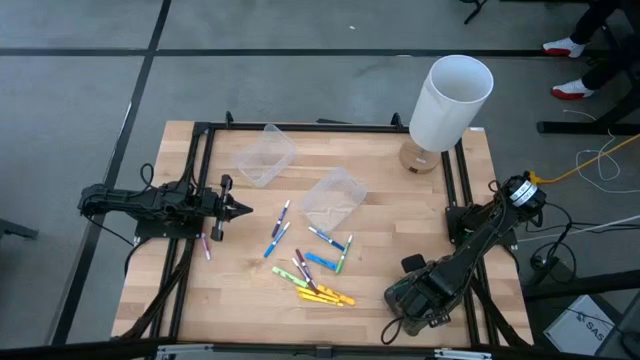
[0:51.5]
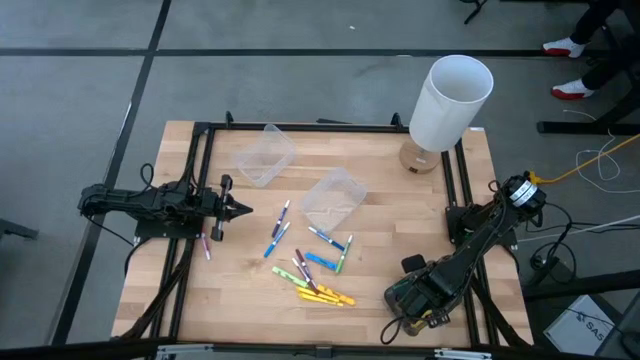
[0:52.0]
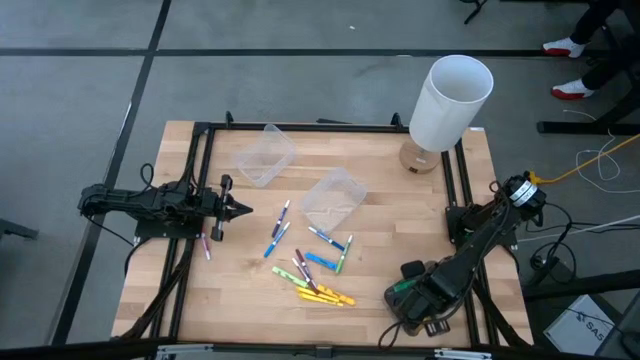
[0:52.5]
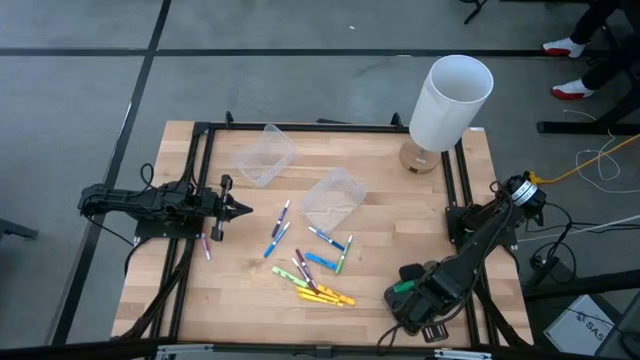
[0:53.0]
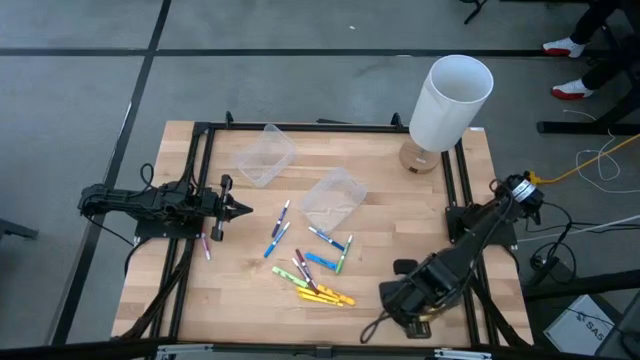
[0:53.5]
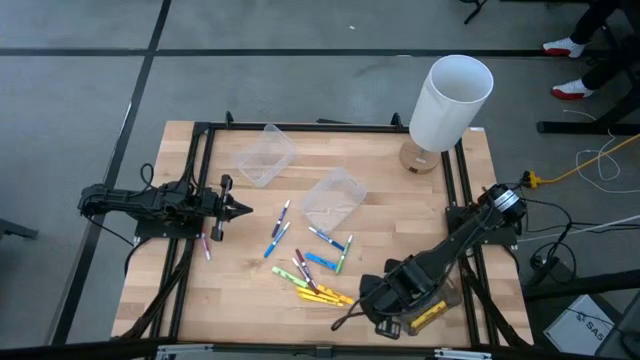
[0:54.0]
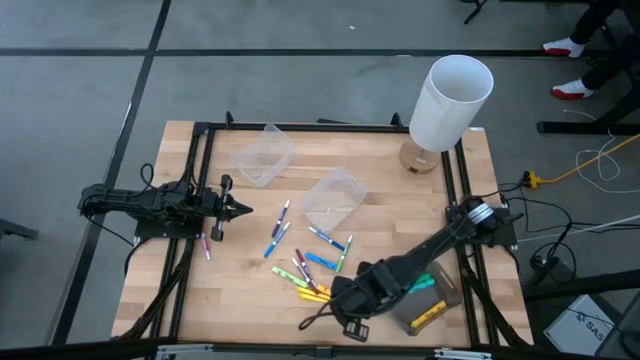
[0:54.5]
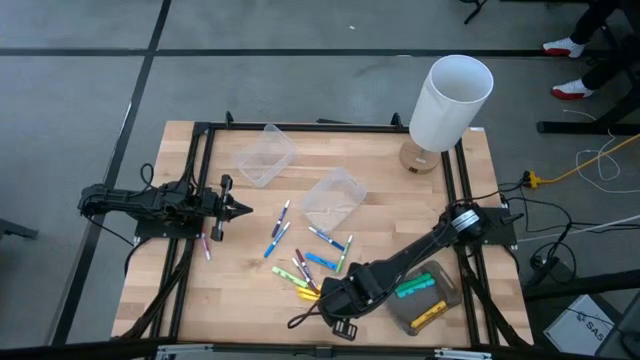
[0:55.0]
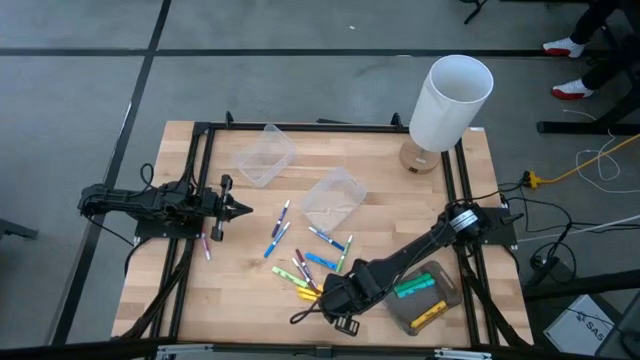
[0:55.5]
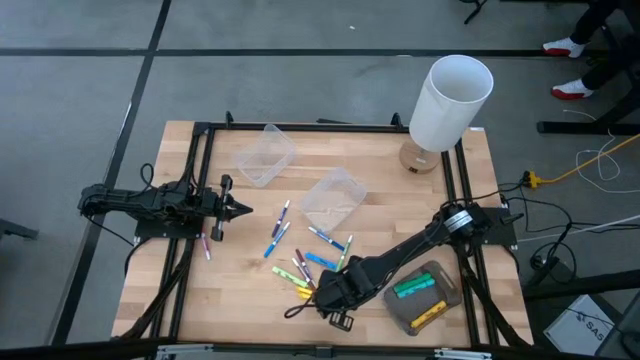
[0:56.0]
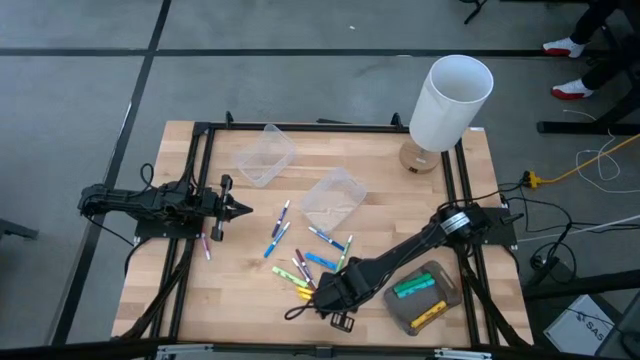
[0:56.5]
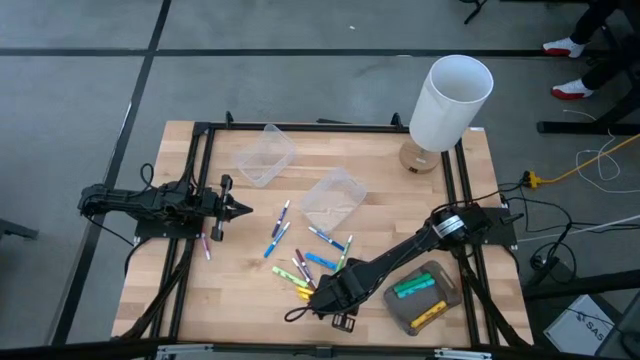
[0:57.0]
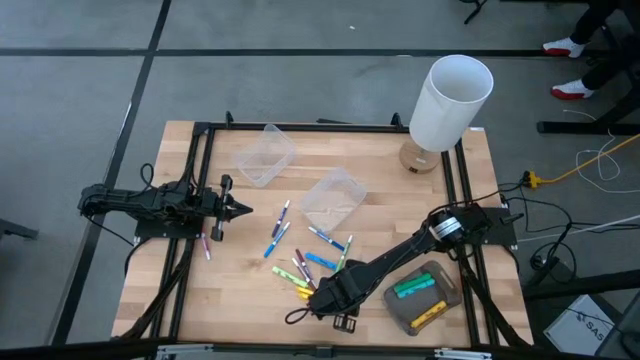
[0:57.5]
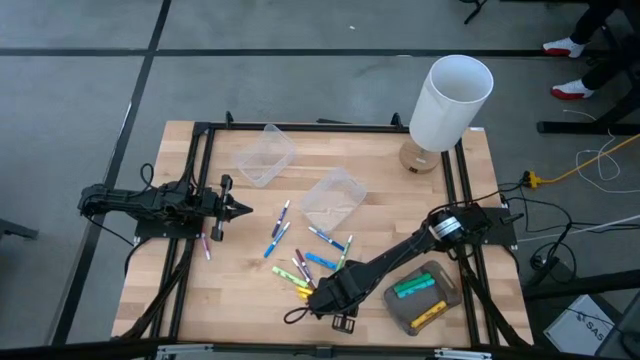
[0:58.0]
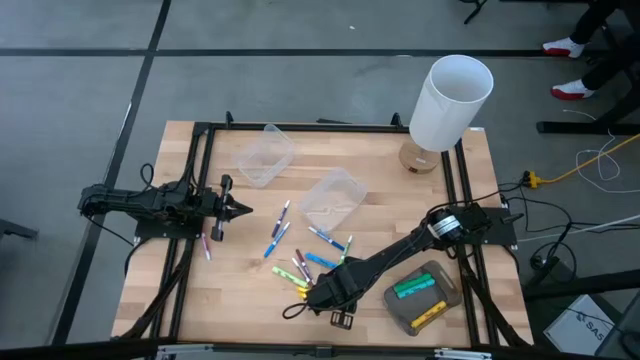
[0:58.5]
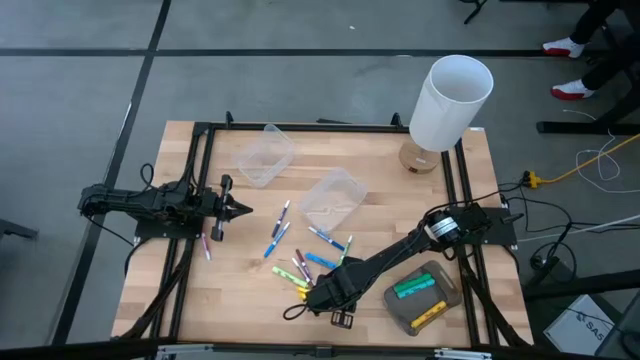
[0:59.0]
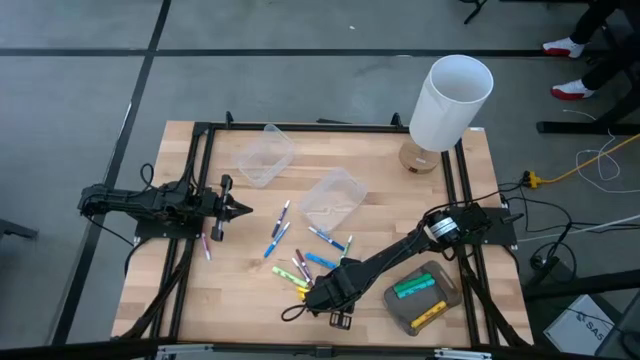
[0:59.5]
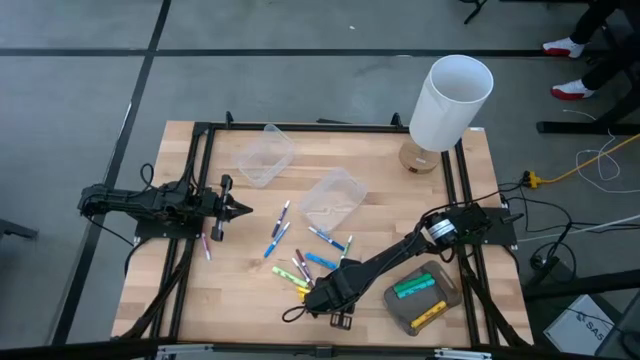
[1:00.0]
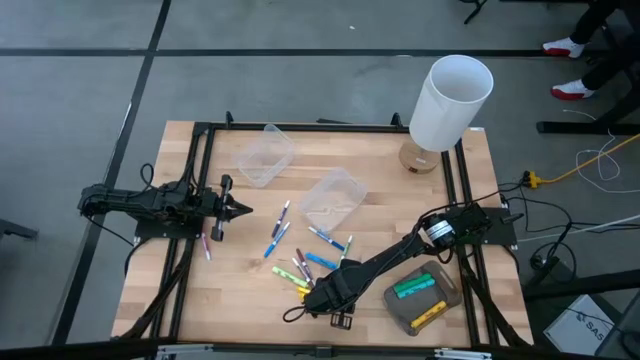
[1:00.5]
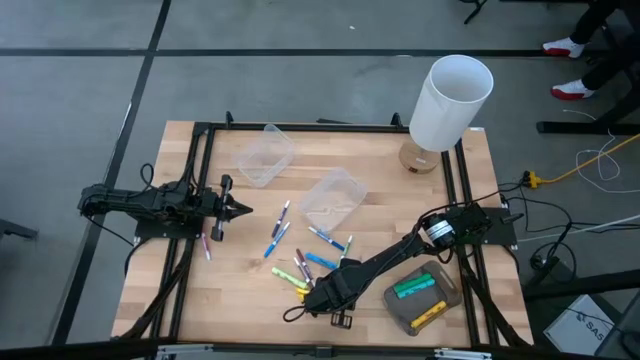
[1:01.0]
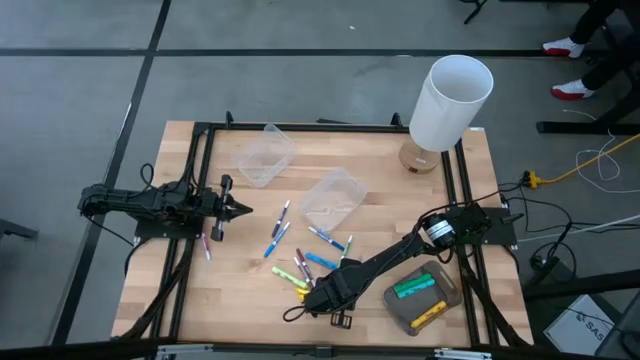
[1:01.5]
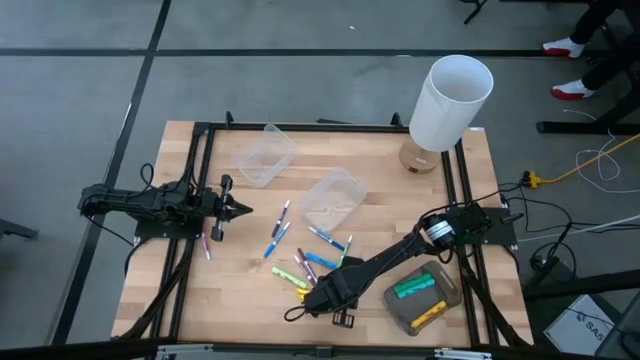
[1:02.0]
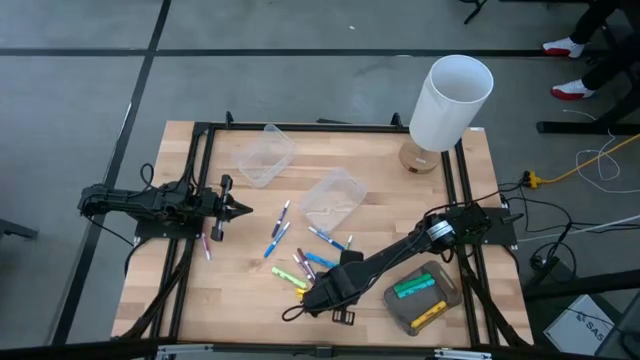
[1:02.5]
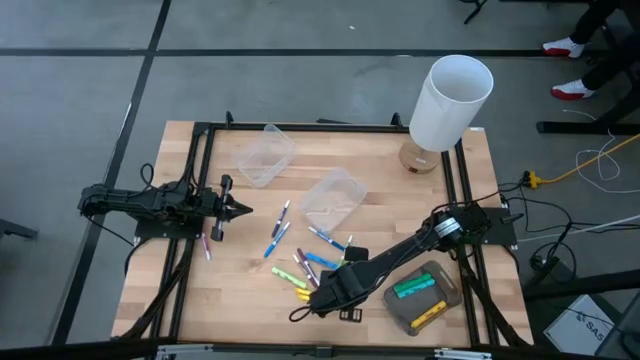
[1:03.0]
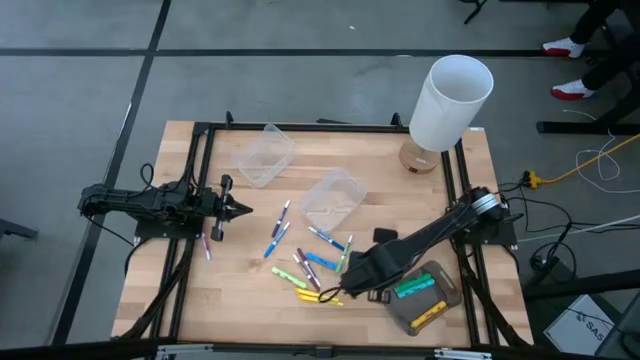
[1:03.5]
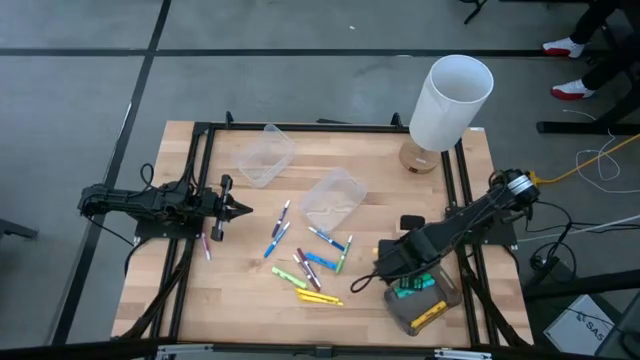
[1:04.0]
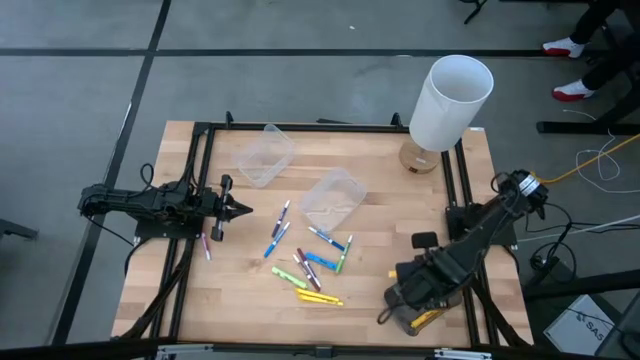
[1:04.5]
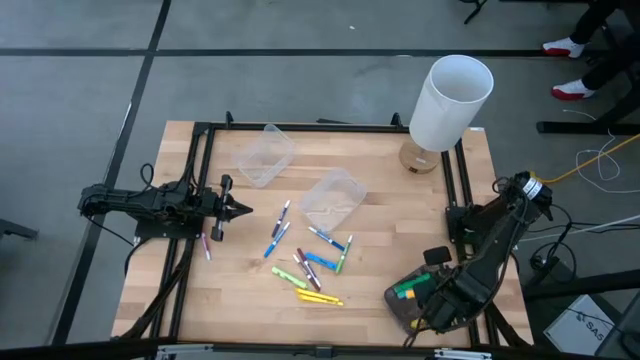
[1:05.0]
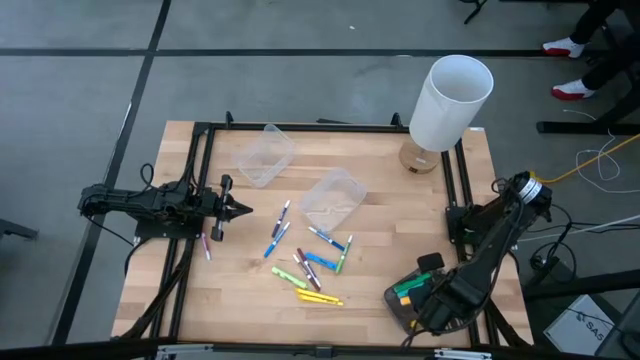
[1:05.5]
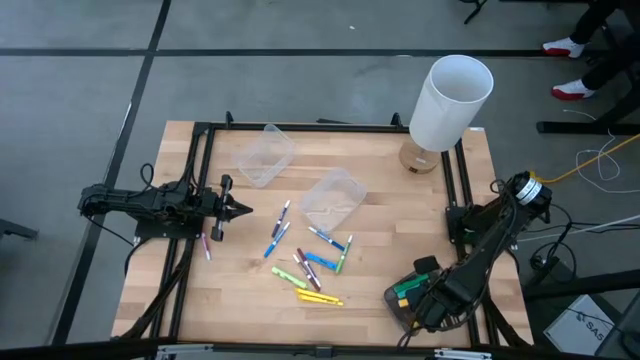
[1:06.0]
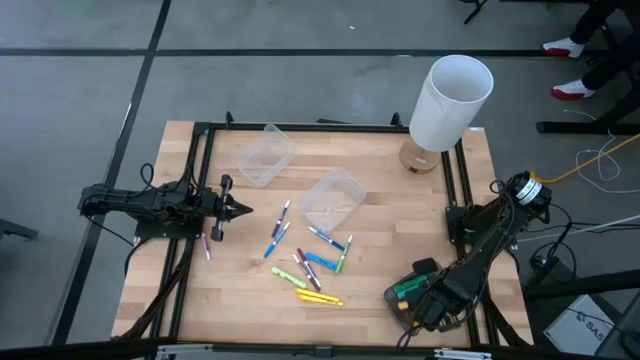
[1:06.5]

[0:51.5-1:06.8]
Task: Pick & Place Markers
Put the yellow highlighter into the black bin

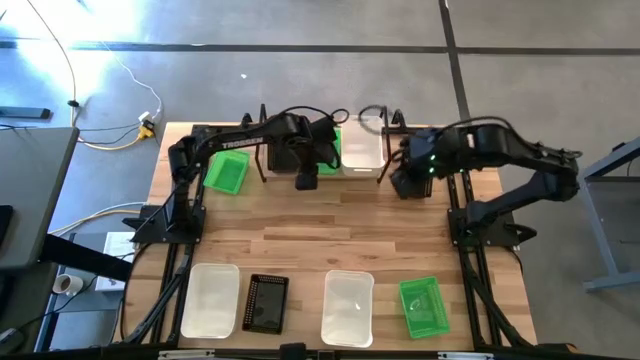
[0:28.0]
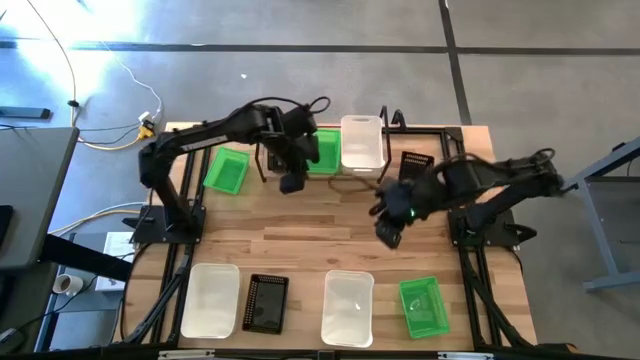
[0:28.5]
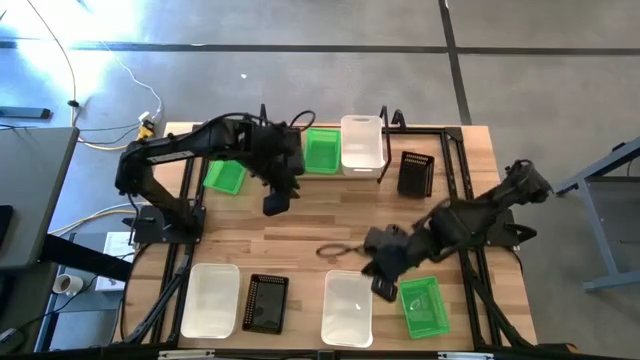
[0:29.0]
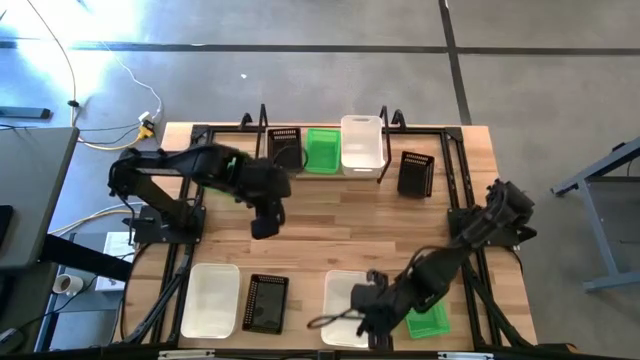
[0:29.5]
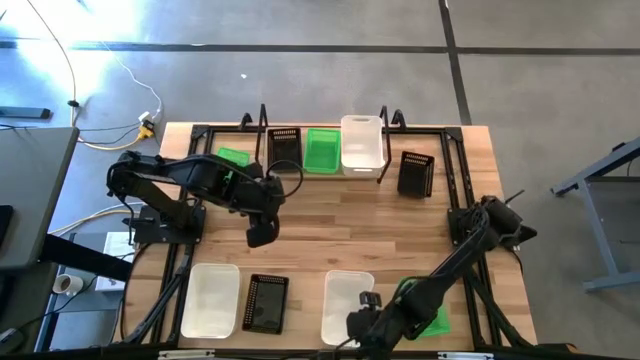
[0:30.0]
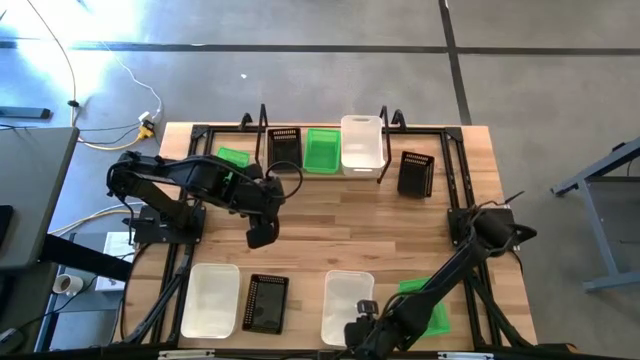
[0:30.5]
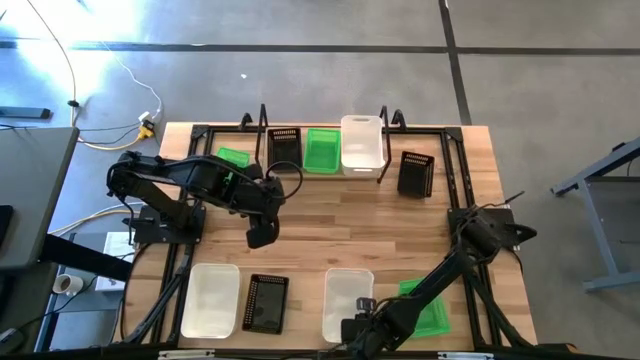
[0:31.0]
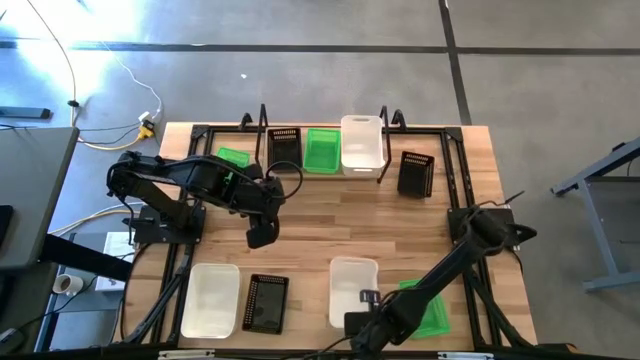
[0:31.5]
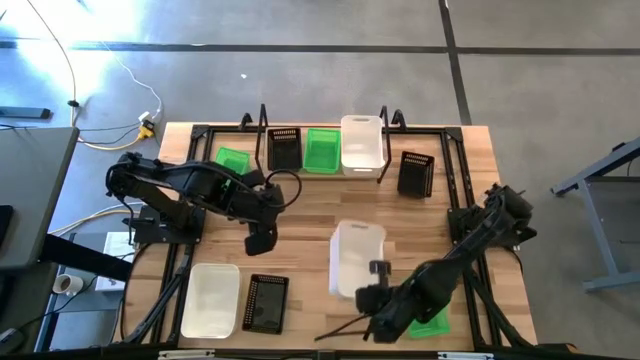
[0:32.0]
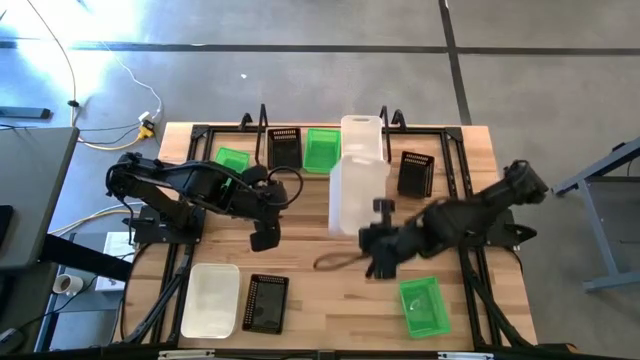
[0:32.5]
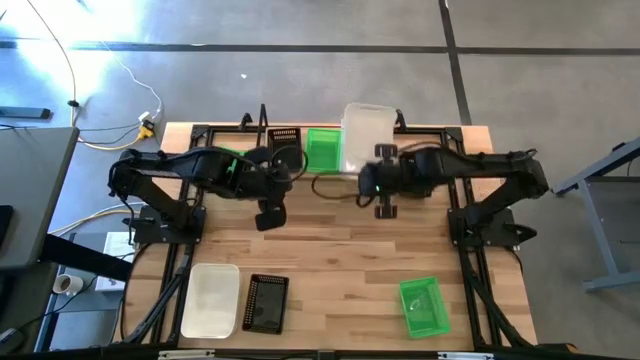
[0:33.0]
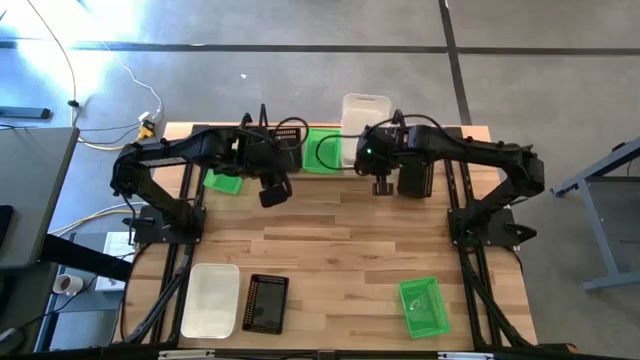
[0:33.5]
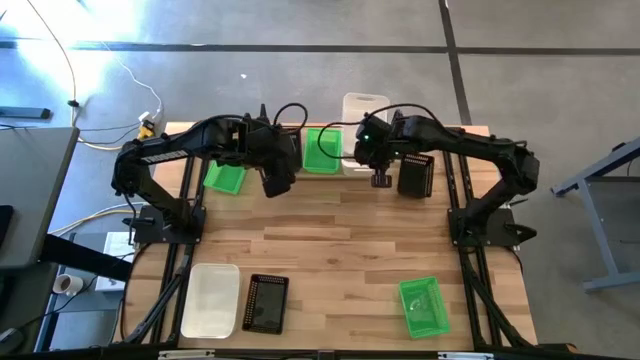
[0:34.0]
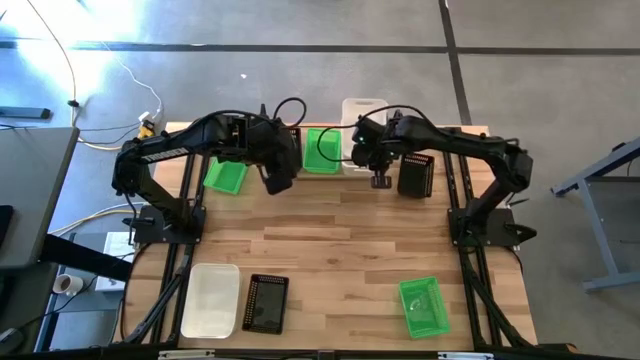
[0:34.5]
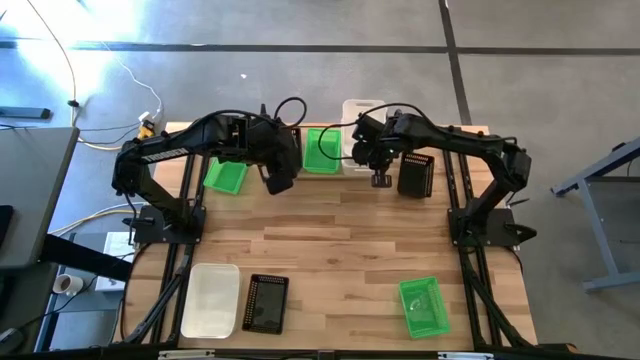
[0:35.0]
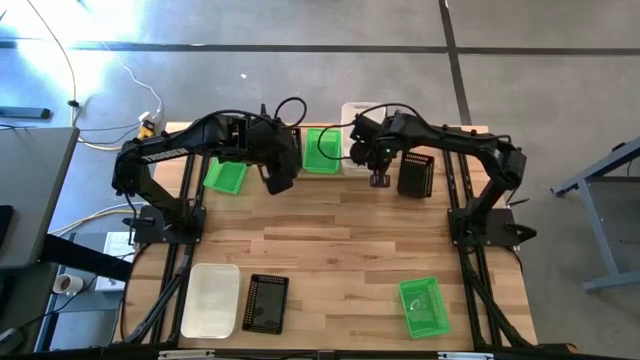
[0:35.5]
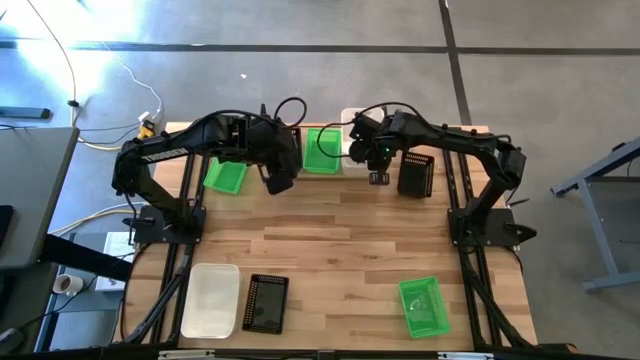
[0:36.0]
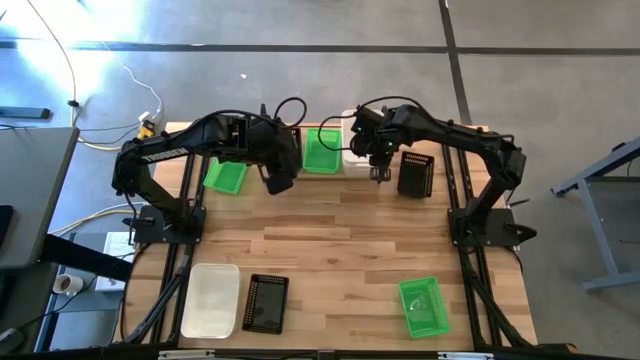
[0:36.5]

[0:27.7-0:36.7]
Task: Stack baskets on shelf by color
Stack the right white bin on the white bin on the shelf
